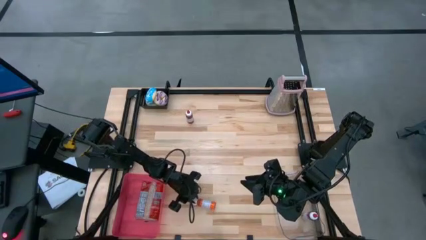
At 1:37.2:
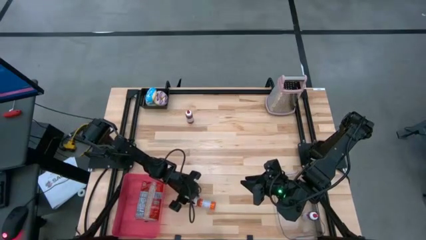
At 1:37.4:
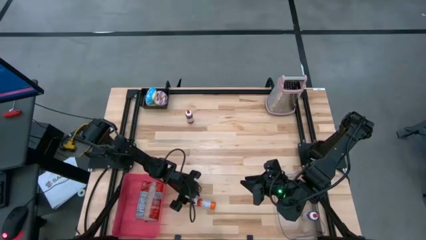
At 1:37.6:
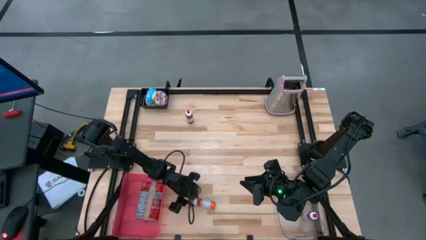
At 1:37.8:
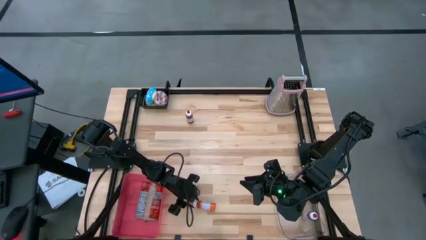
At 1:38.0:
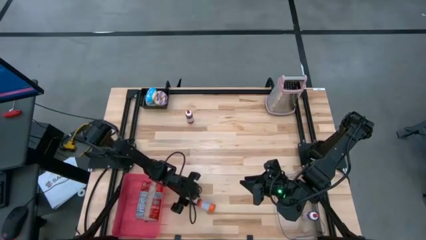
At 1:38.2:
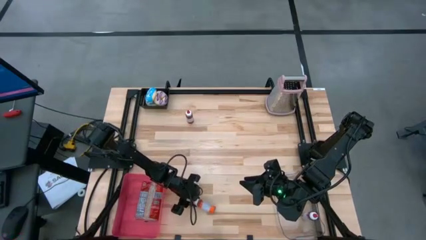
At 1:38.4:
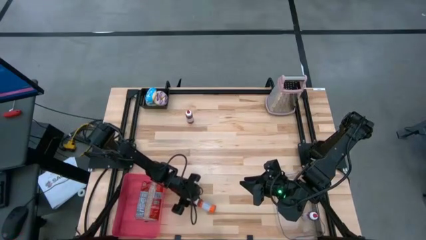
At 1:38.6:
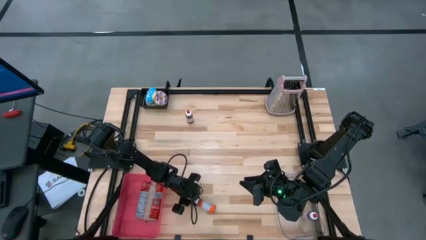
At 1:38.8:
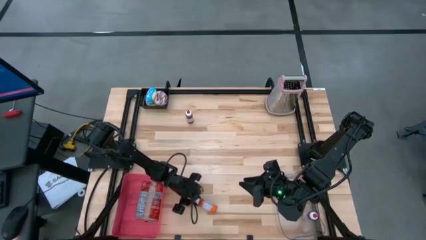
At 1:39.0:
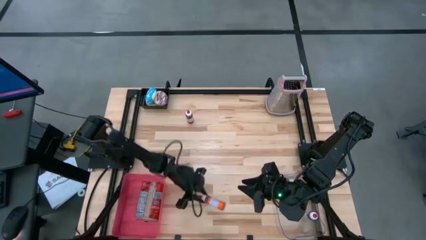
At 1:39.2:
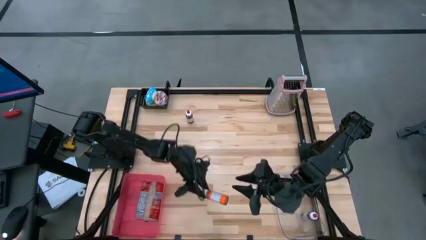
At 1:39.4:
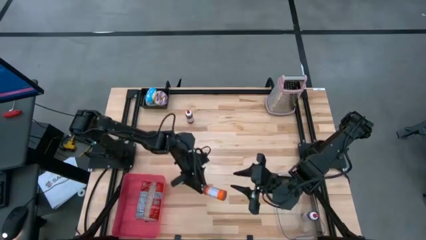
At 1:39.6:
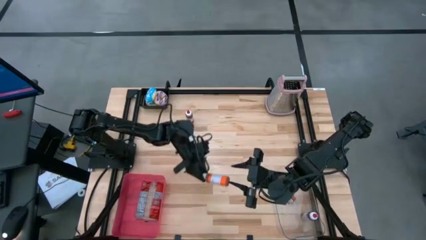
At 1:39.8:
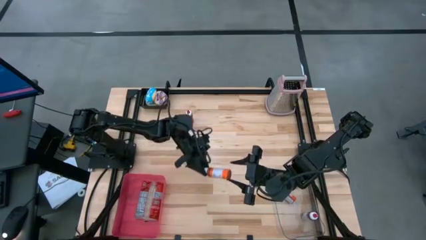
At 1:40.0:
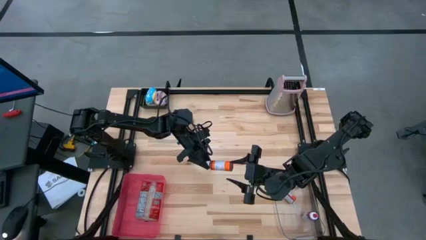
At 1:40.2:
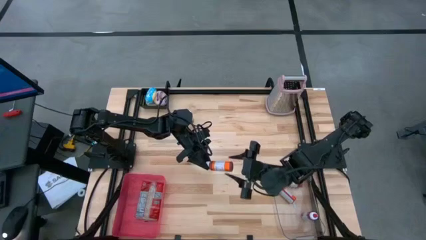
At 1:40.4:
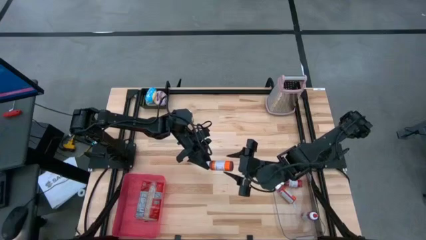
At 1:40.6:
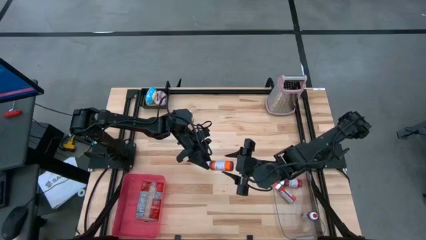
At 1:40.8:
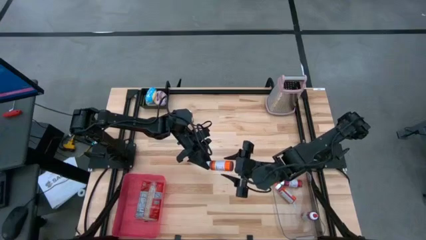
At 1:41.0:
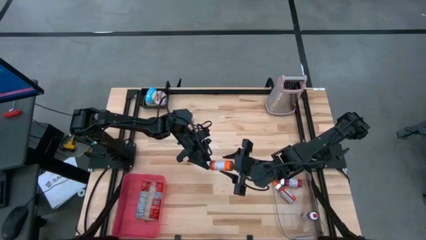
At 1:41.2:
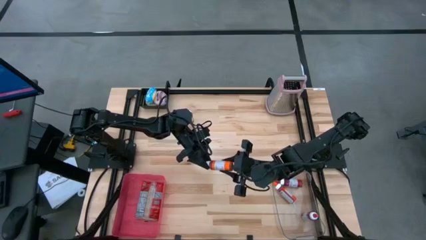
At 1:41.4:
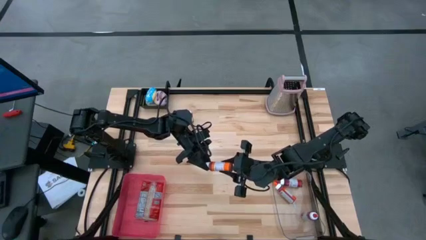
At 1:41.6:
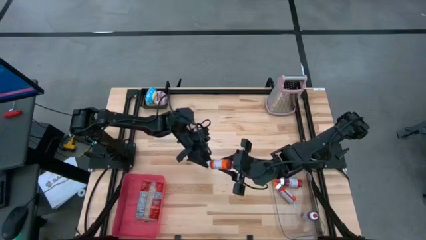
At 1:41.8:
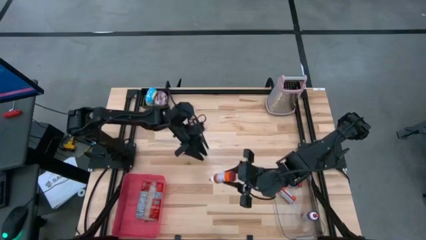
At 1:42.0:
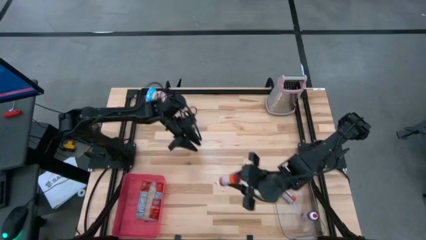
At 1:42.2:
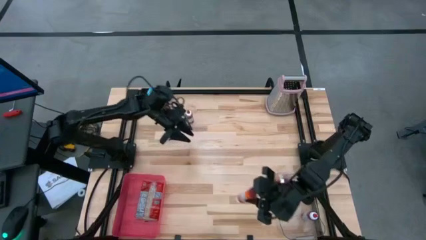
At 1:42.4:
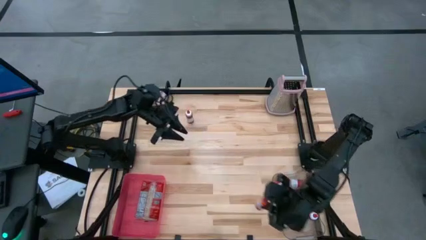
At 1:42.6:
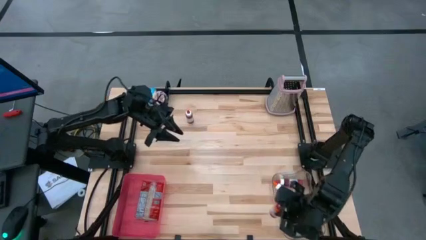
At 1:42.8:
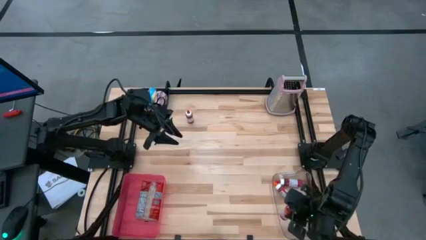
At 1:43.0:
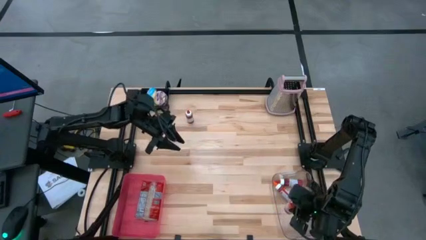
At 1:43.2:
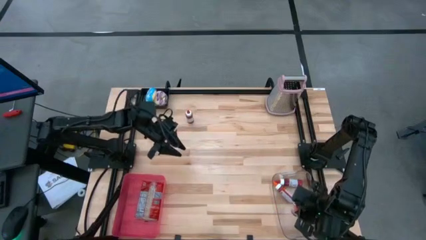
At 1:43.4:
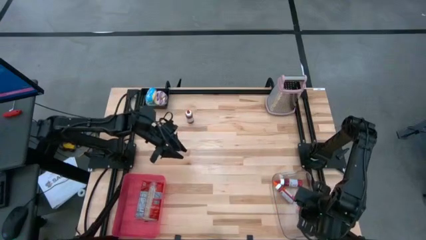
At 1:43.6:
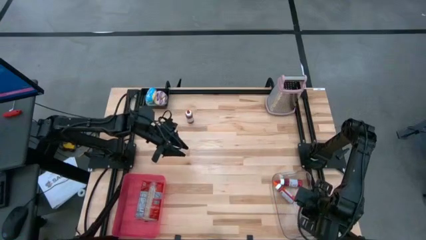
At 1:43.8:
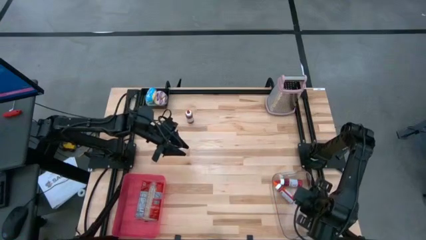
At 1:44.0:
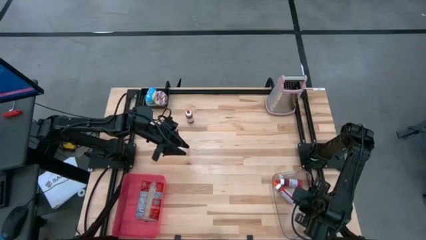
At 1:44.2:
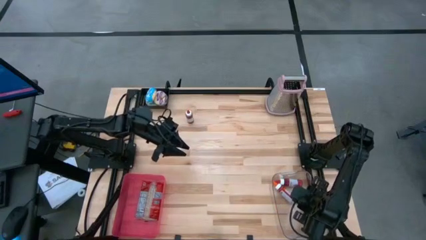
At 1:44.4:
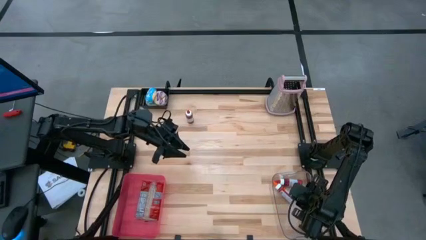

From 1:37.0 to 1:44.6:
Put the orange food coloring bottle into the transparent bin

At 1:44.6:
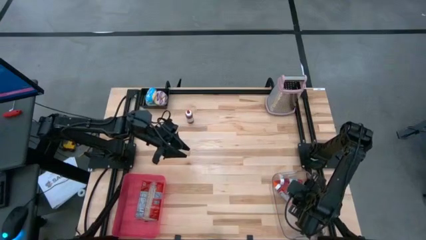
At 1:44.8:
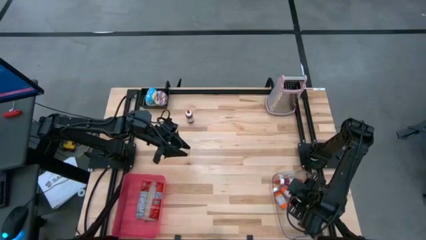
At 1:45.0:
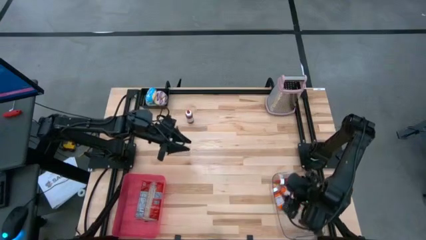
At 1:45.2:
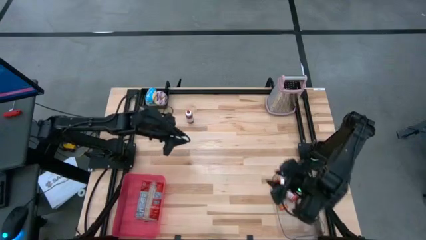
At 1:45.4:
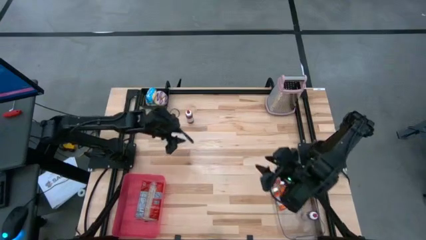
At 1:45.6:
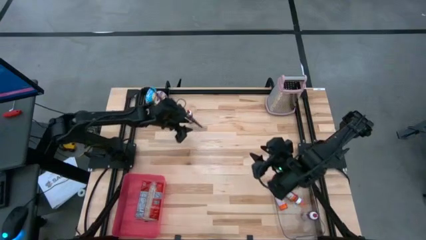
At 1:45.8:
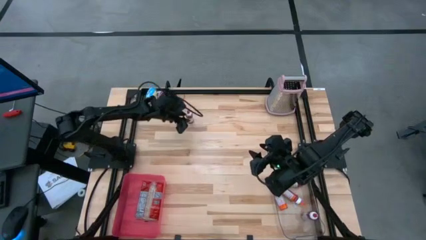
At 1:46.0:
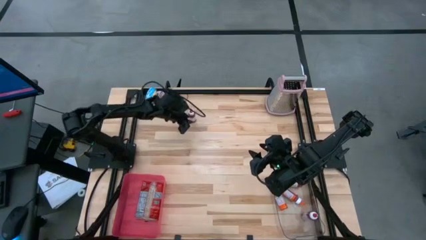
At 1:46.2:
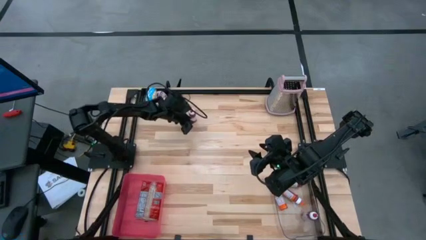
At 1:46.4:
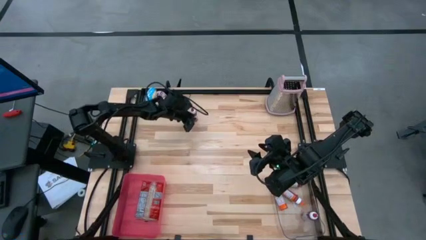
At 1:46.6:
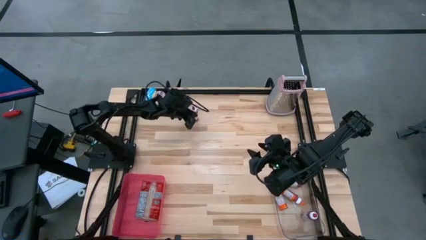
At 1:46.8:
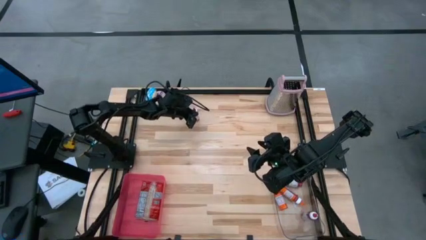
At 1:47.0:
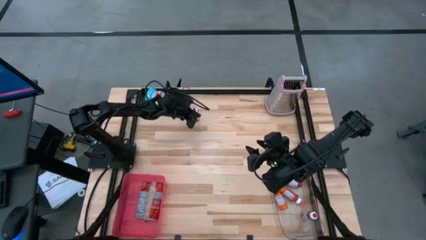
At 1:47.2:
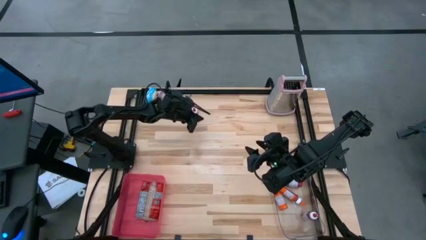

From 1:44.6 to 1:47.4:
Put the red food coloring bottle into the transparent bin

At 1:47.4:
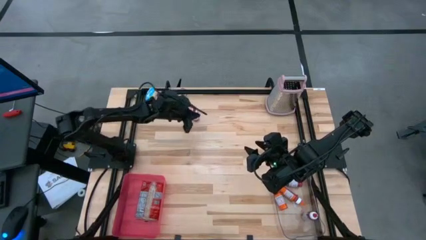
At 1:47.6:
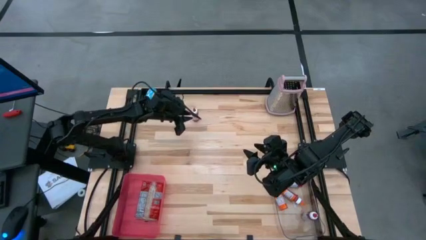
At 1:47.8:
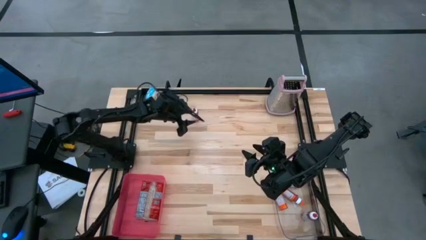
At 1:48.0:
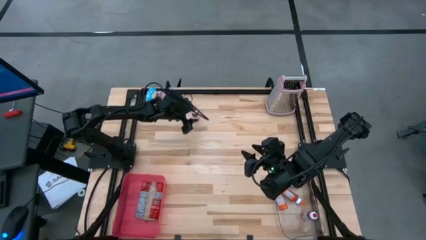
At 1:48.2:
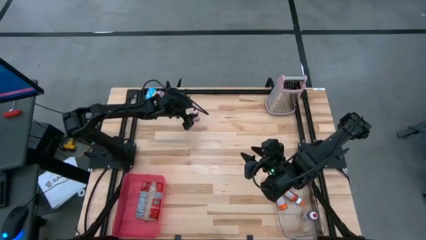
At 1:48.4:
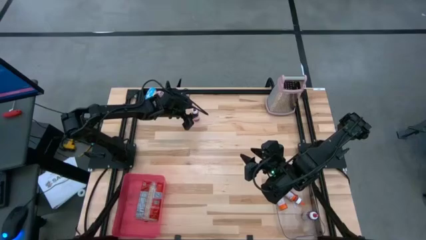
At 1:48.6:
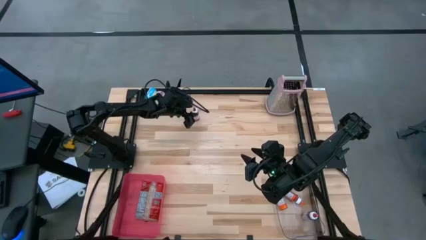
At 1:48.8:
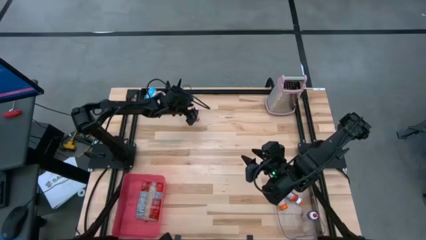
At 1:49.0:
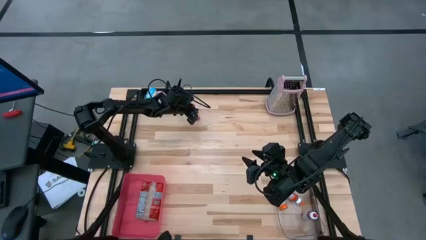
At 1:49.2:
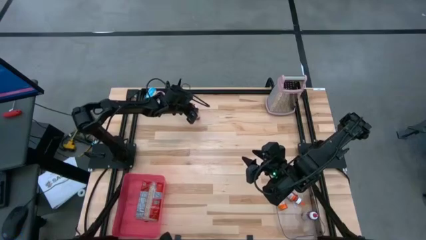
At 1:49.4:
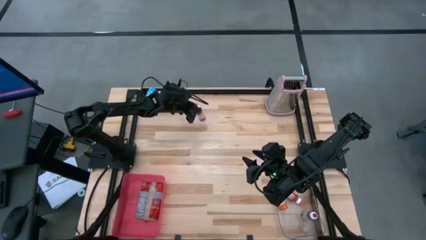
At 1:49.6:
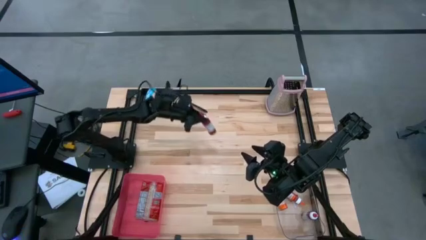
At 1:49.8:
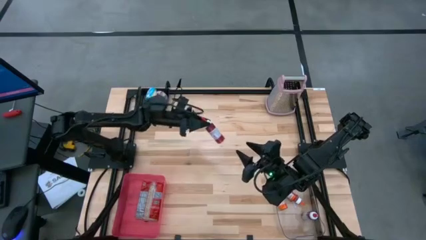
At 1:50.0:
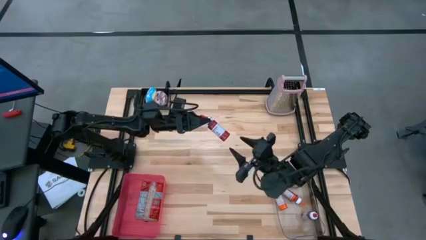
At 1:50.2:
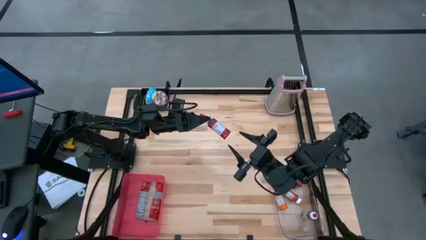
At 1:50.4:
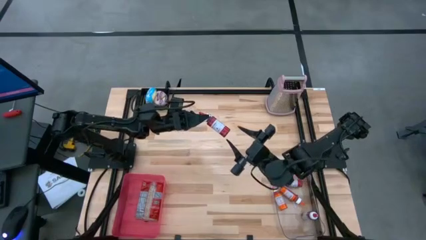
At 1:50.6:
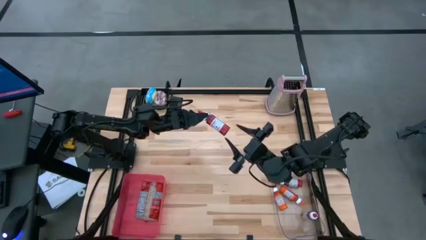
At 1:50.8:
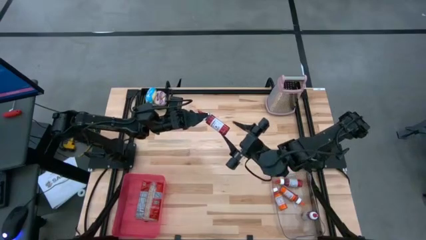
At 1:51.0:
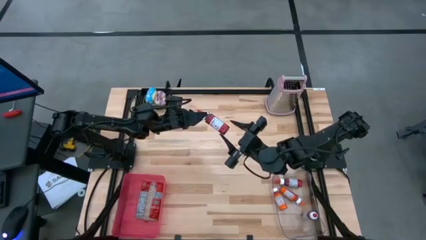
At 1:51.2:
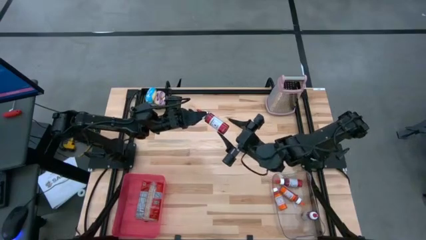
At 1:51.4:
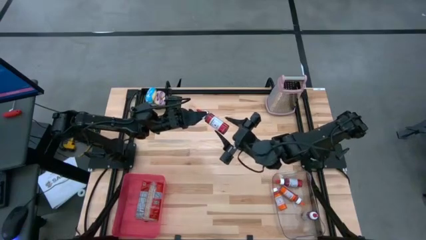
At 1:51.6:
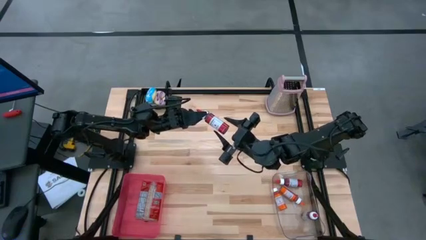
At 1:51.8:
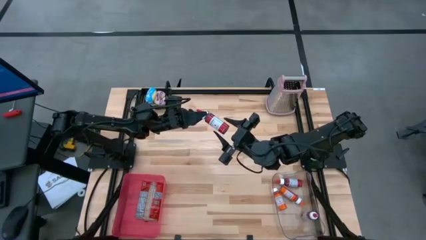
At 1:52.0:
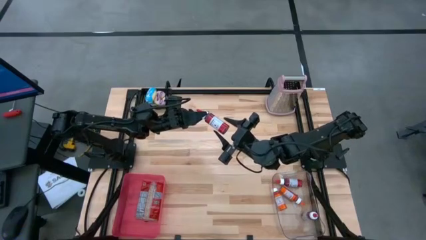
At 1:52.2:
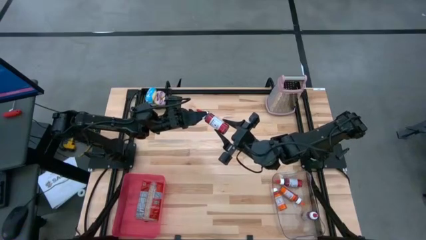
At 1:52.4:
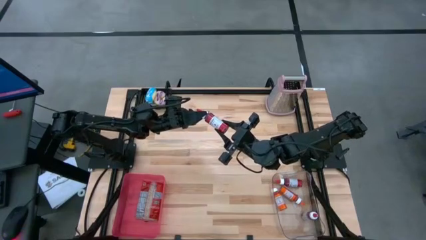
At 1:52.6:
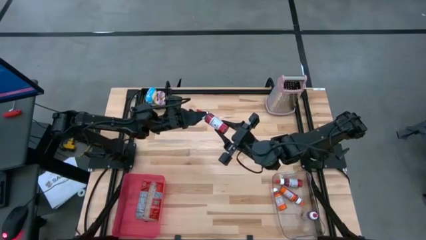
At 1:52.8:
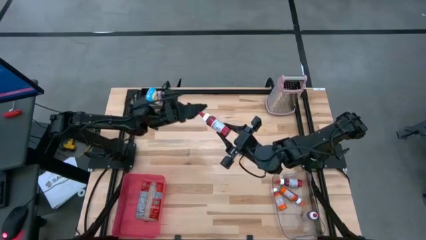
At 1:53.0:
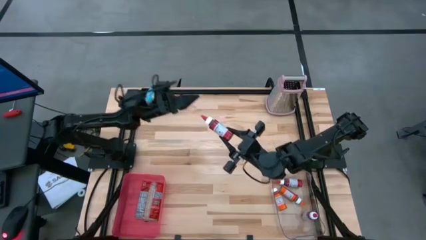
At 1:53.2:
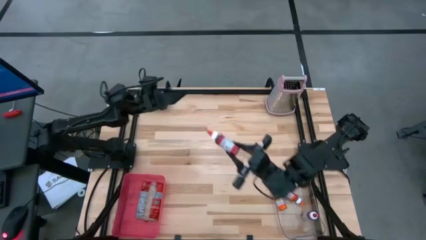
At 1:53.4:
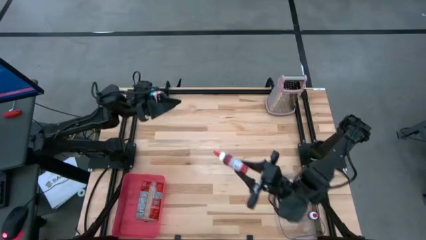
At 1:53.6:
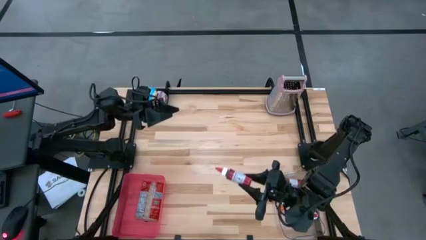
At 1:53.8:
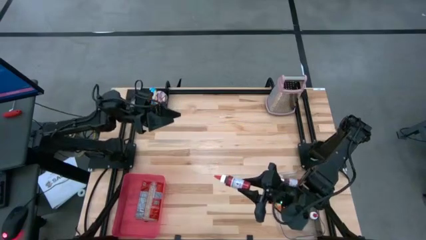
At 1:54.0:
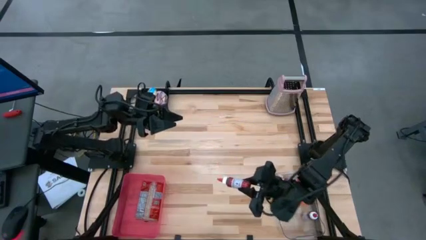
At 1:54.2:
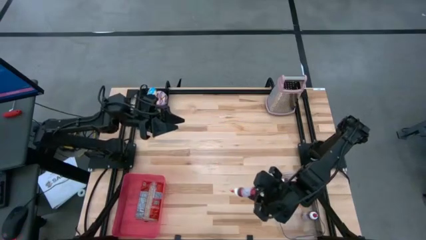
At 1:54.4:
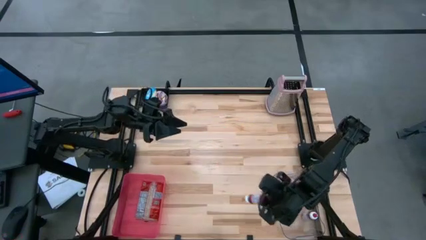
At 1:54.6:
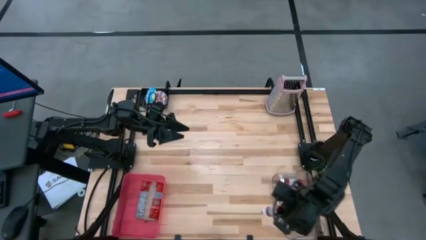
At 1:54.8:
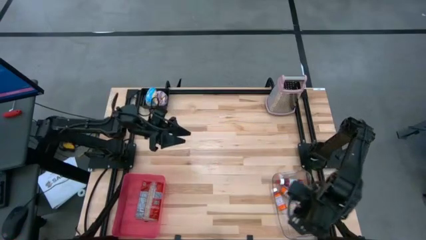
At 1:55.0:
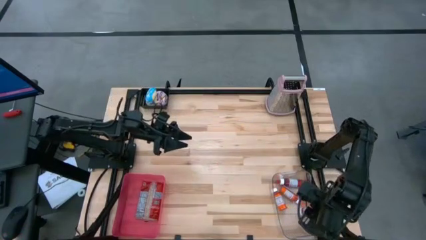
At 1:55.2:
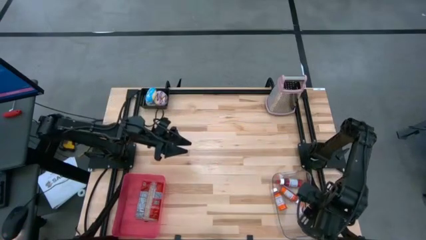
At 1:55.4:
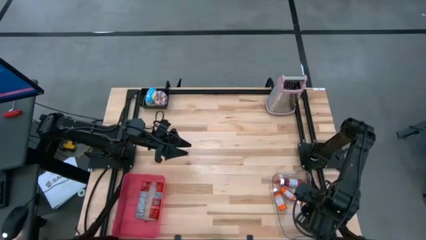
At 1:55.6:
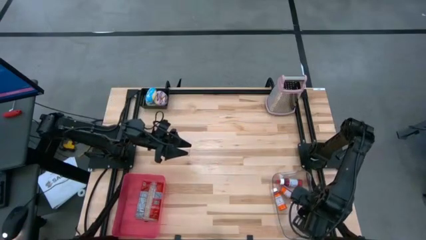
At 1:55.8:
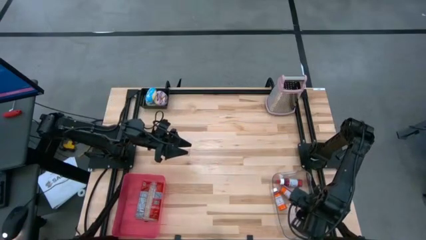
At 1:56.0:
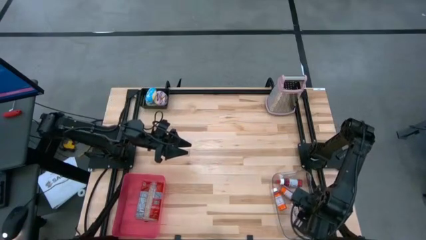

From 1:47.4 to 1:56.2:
Put the red food coloring bottle into the transparent bin
